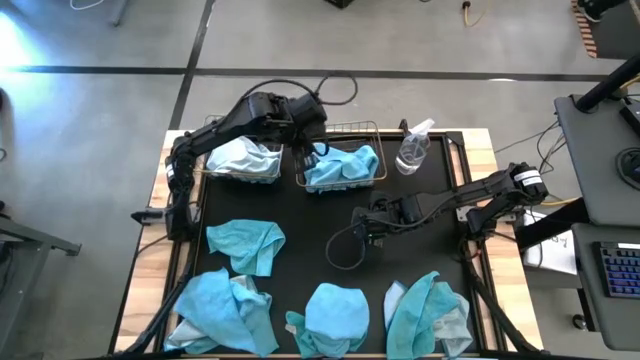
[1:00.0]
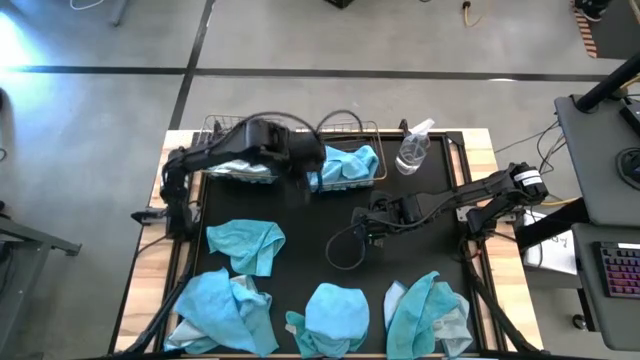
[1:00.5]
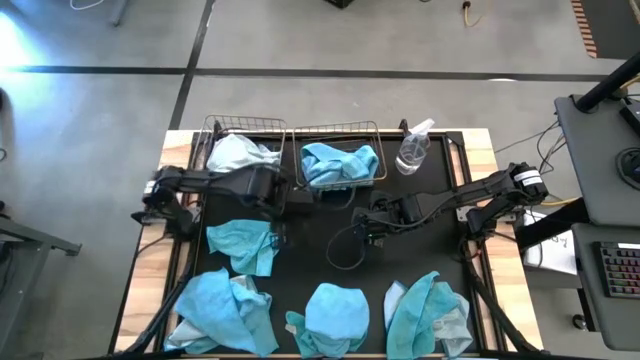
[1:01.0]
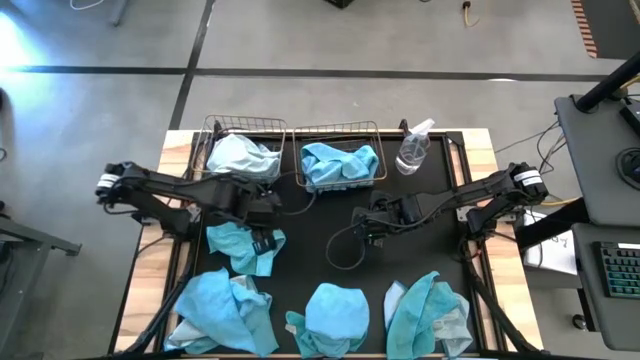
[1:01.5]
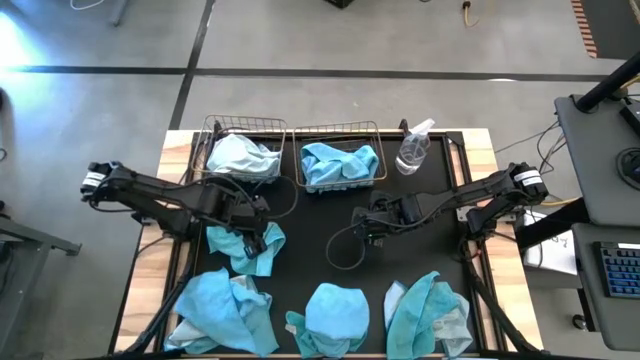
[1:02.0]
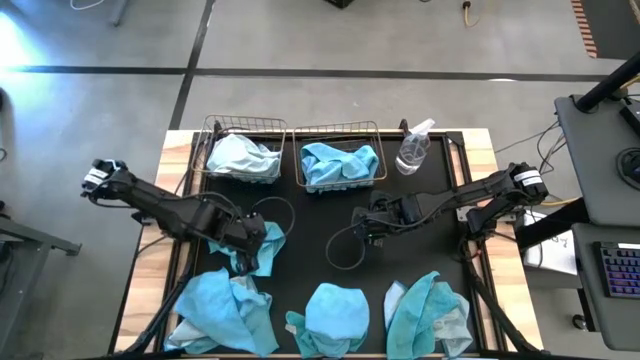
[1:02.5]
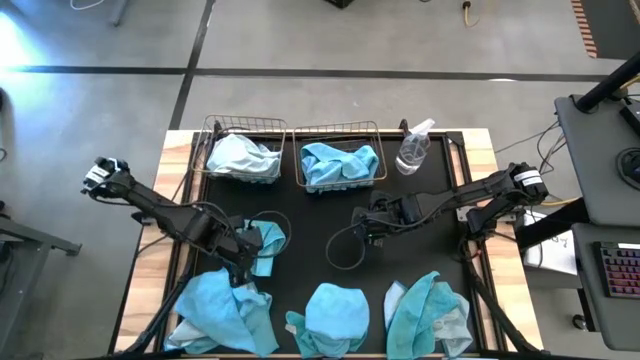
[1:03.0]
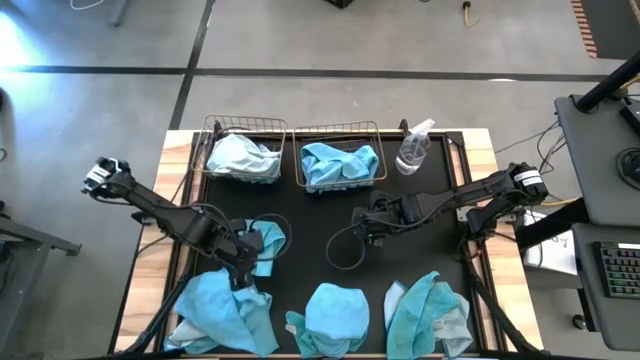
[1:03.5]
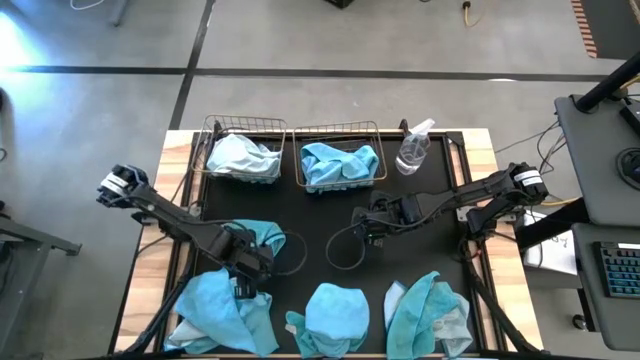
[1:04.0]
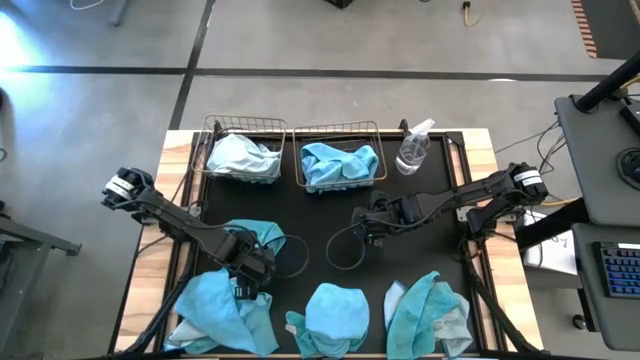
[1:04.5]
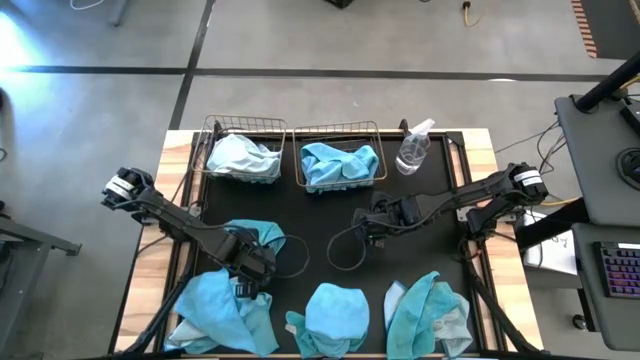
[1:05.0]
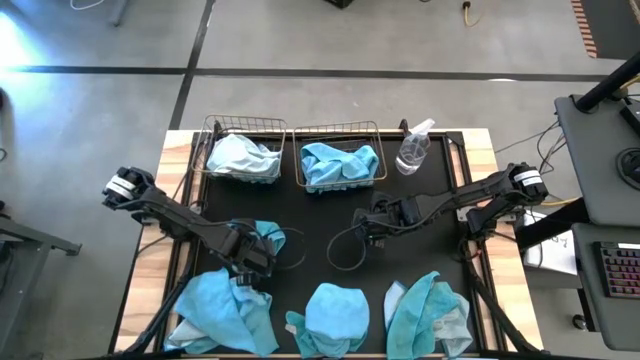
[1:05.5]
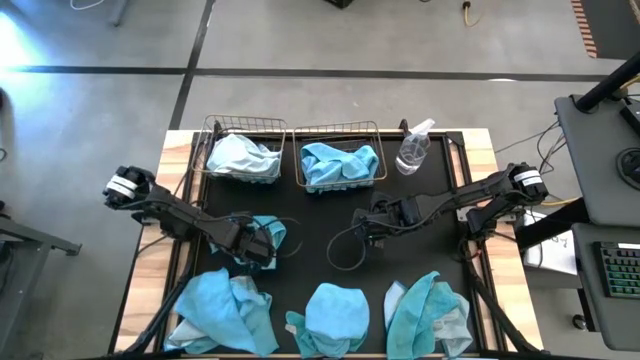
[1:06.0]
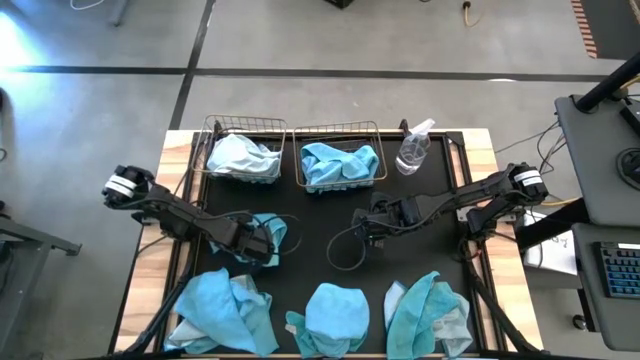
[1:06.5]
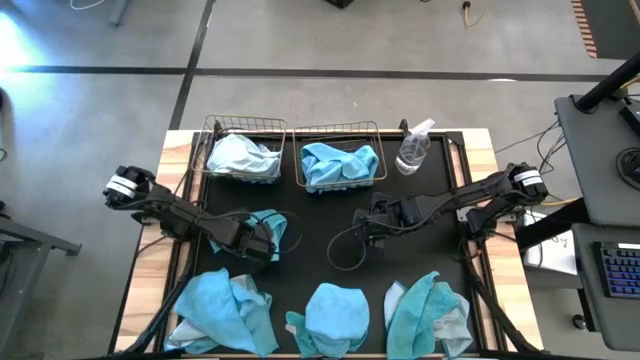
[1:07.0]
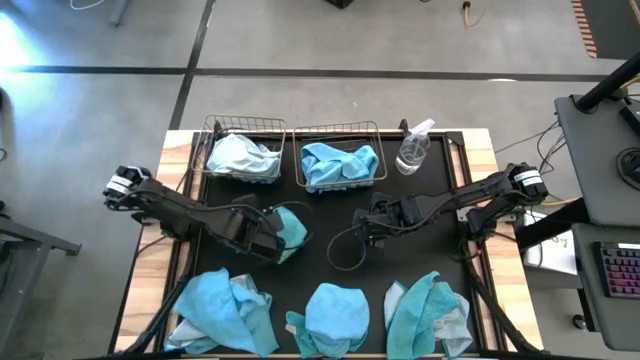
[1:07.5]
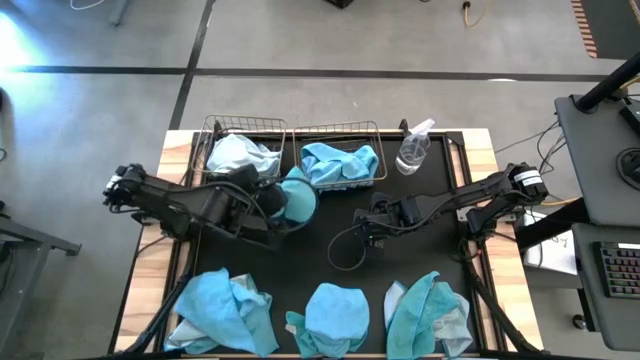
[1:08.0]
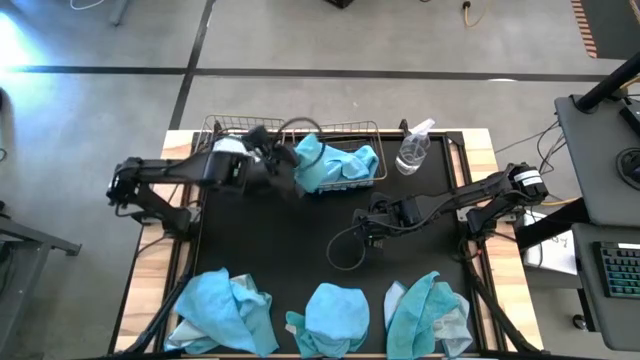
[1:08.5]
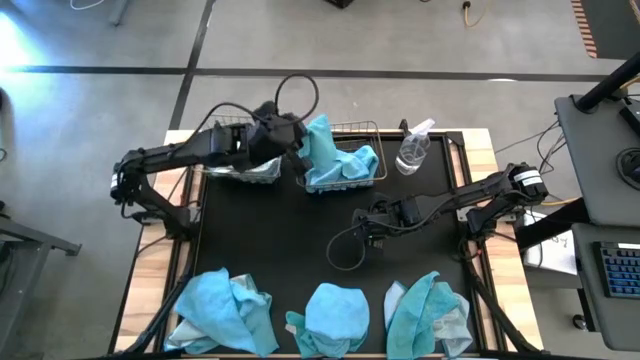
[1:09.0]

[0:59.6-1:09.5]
Task: Sort microfiber towel by color & place in baskets
Put the blue microfiber towel into the right wire basket

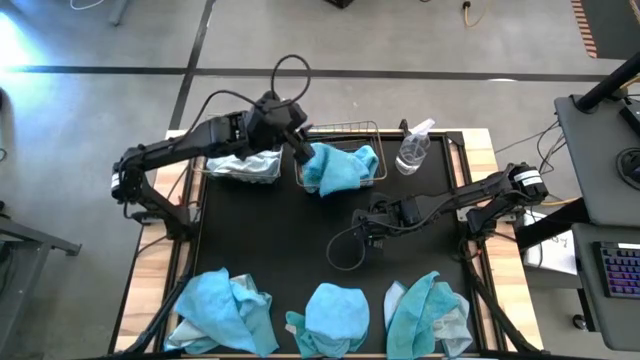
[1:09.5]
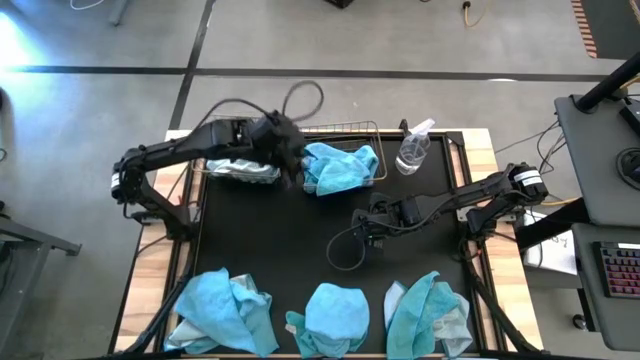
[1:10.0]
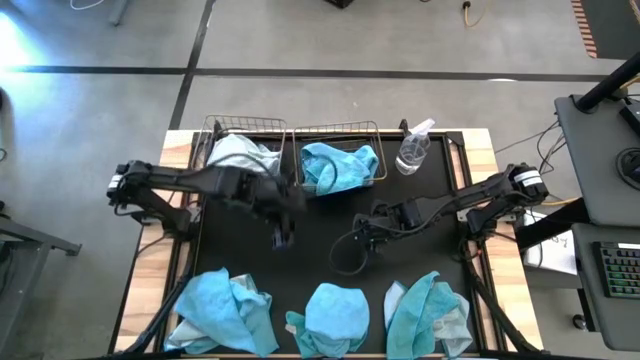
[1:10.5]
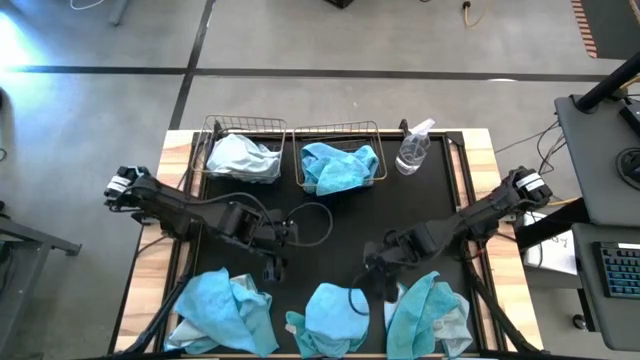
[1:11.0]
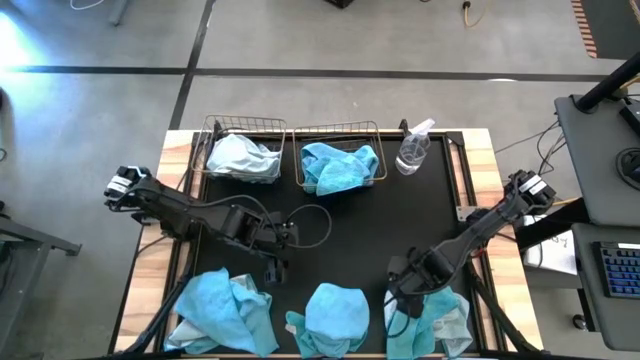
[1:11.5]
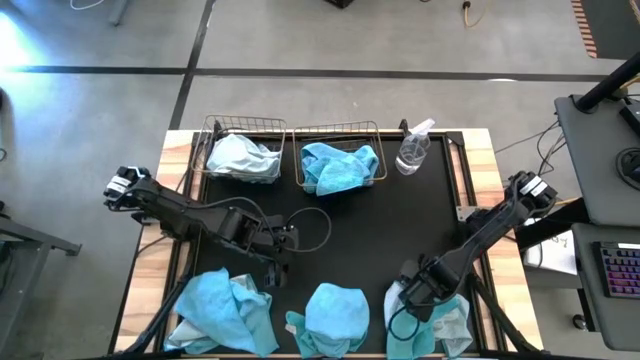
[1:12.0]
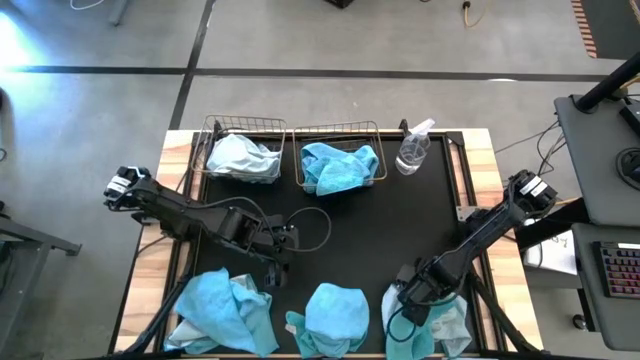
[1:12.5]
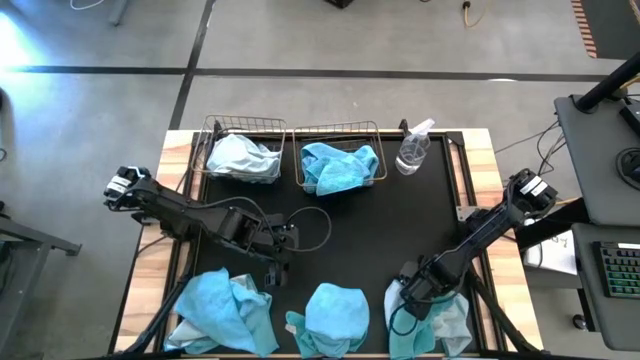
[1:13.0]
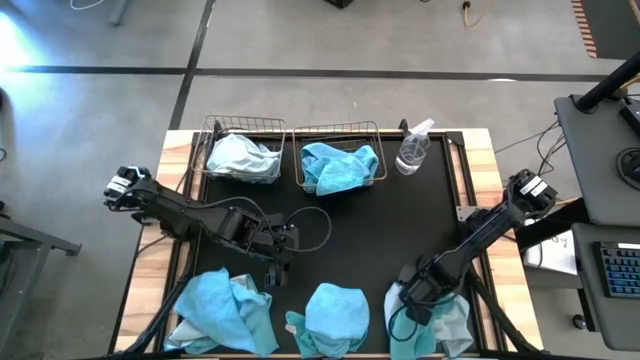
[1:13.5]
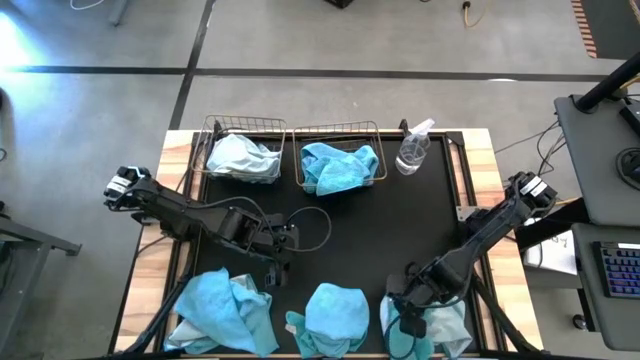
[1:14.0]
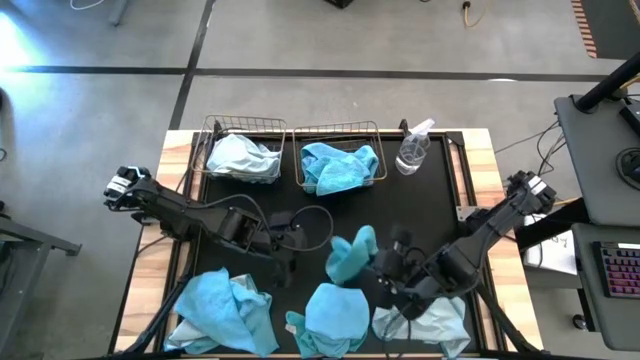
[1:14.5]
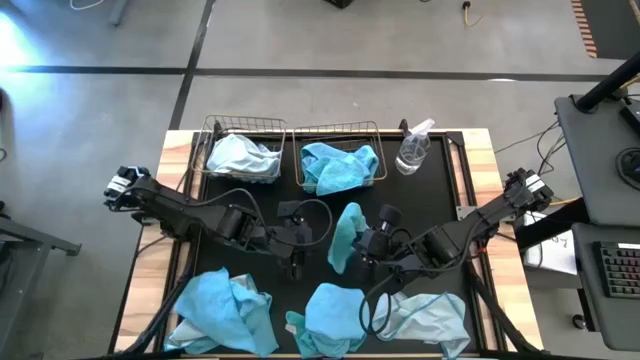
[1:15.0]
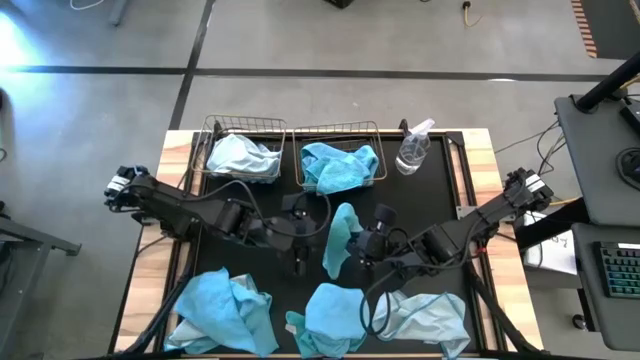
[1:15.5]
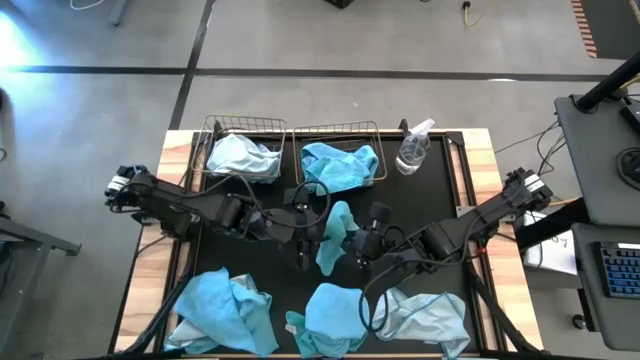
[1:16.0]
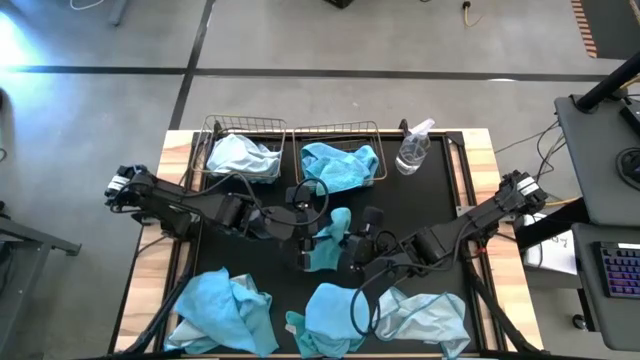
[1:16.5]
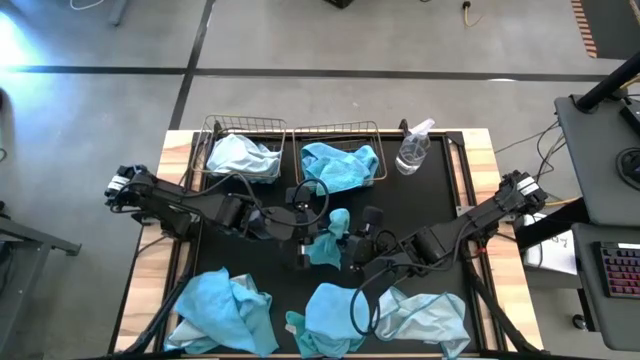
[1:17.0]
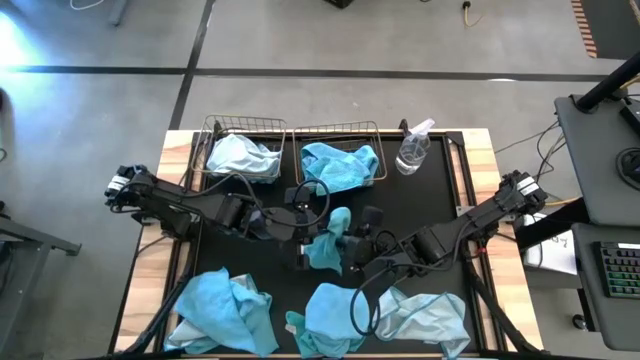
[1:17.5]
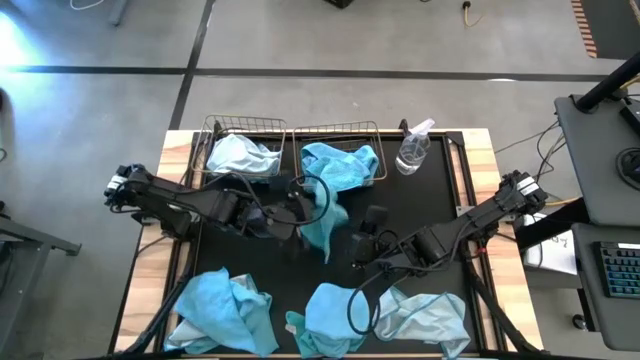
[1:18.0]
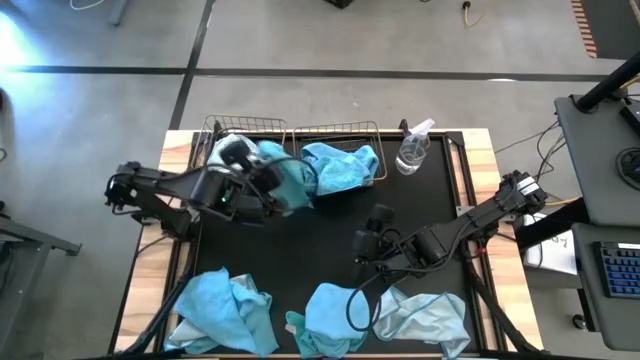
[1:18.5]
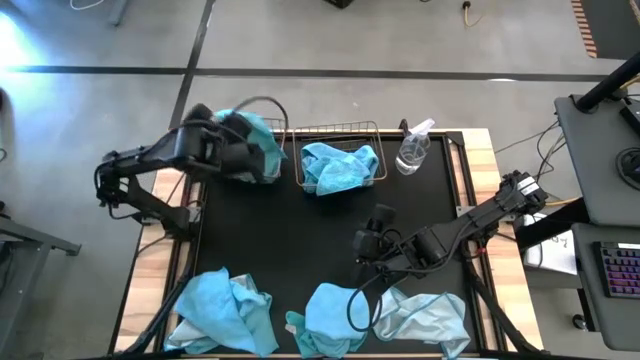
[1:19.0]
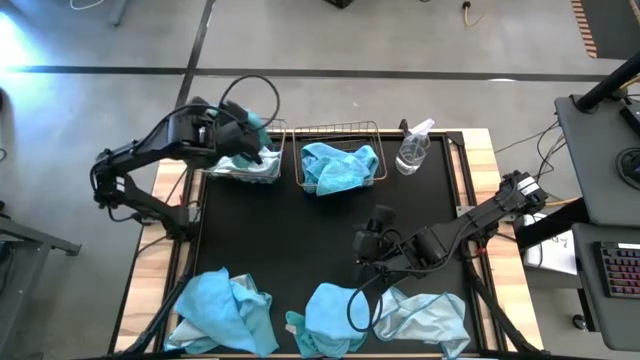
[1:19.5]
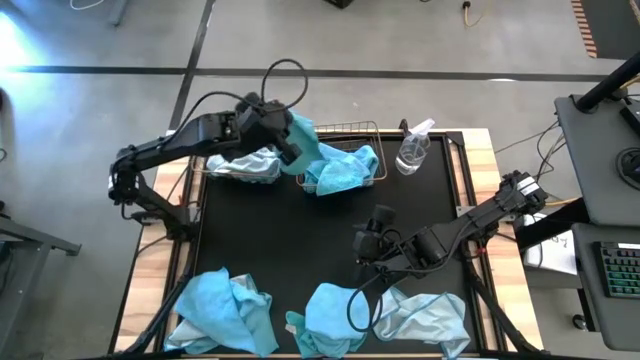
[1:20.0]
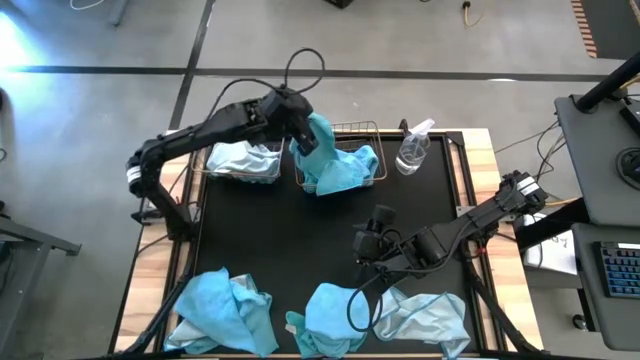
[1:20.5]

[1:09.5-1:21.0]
Put the blue microfiber towel into the right wire basket

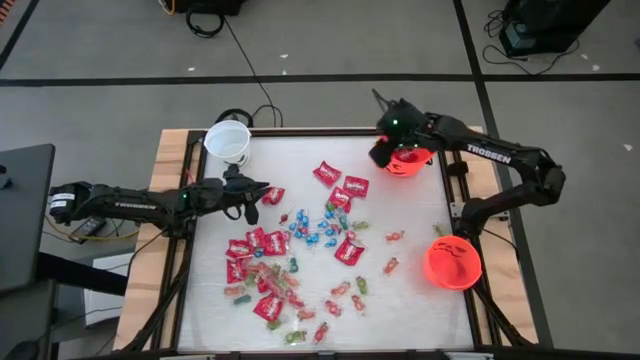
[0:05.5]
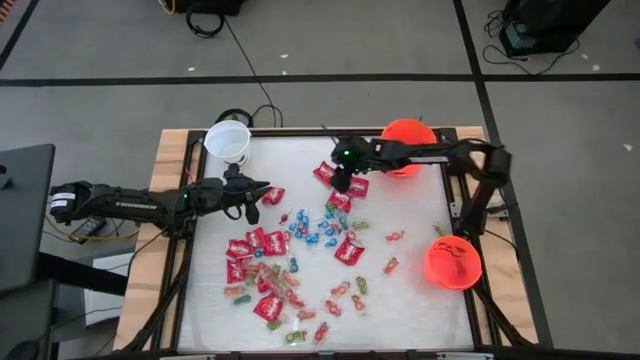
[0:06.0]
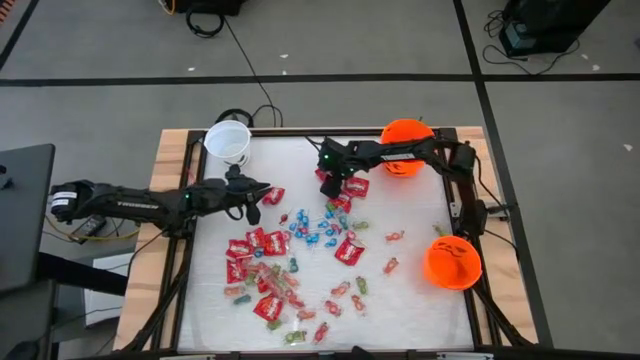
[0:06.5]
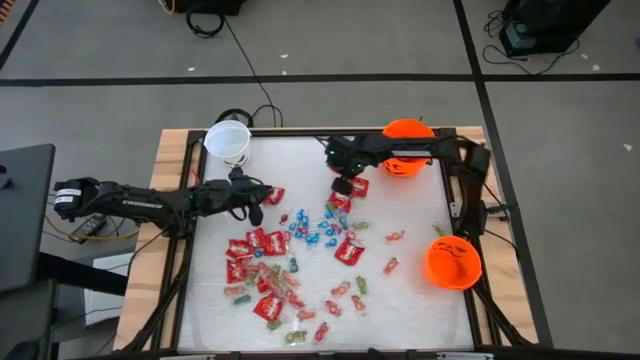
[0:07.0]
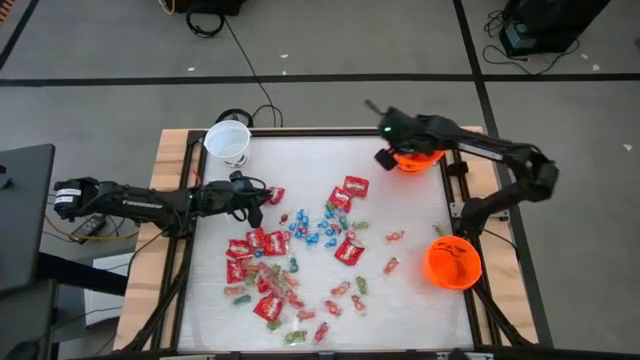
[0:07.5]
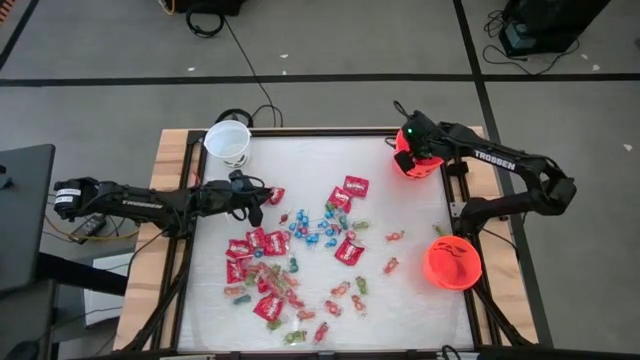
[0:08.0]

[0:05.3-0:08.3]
Task: Sort candy by brand, put in halloween buckets
Put the red candy into the top orange bucket
